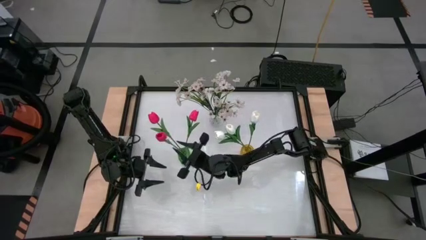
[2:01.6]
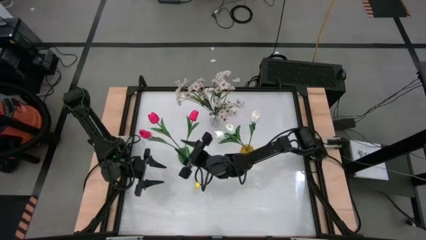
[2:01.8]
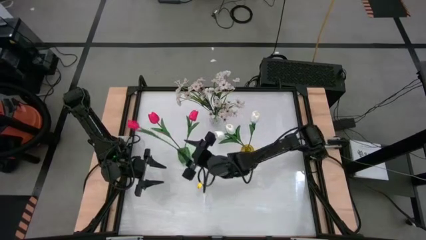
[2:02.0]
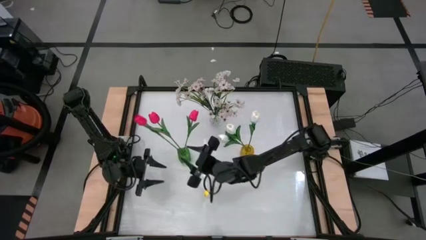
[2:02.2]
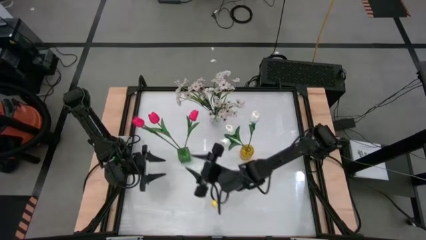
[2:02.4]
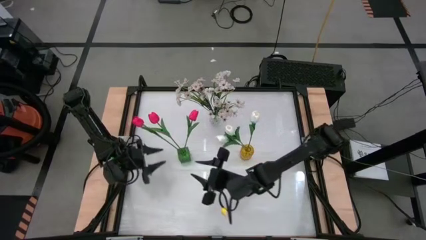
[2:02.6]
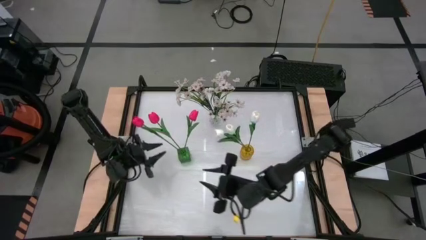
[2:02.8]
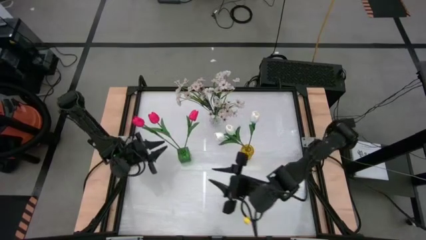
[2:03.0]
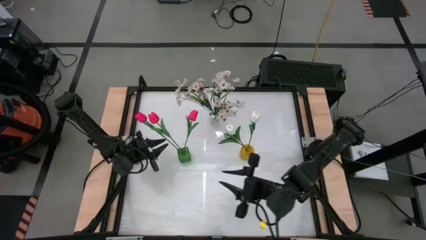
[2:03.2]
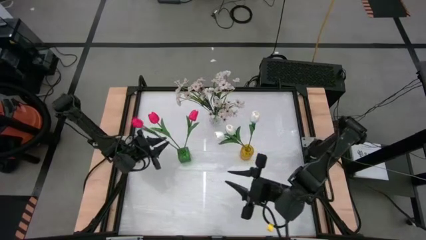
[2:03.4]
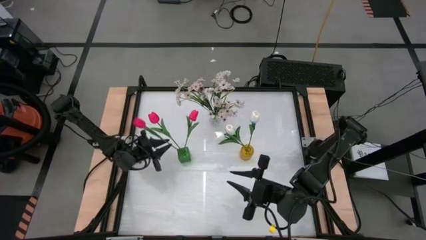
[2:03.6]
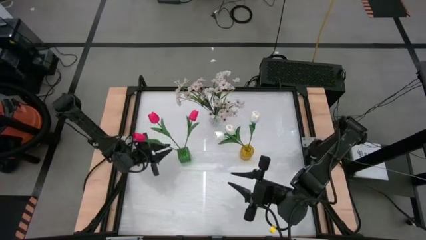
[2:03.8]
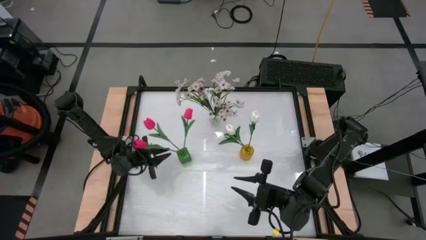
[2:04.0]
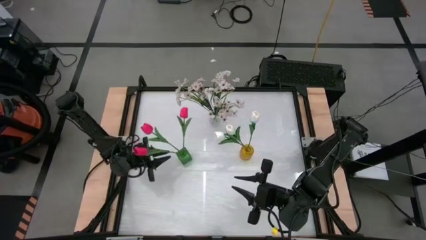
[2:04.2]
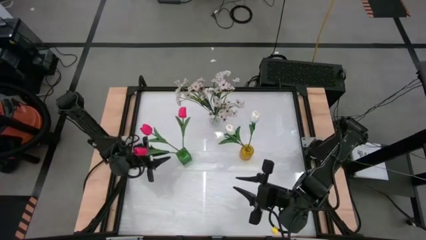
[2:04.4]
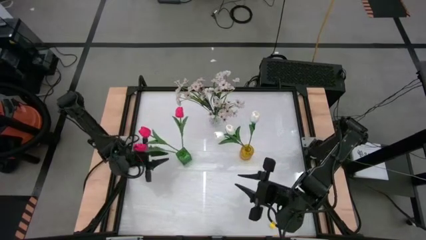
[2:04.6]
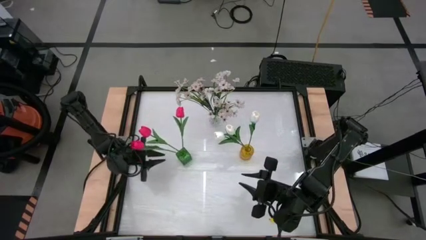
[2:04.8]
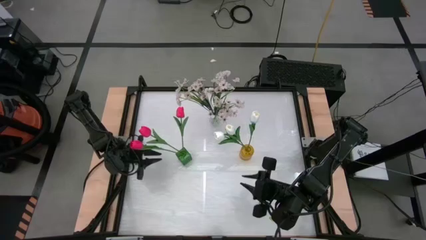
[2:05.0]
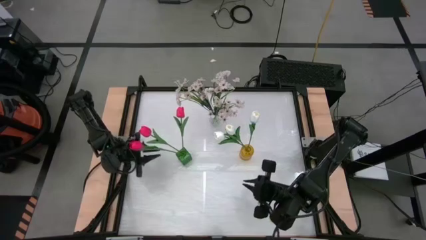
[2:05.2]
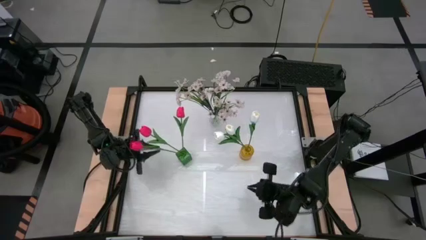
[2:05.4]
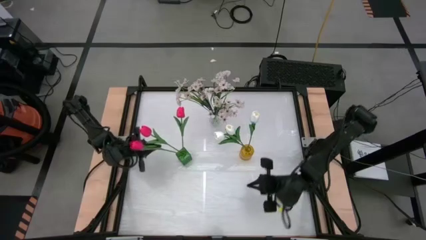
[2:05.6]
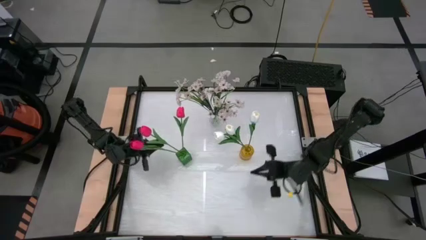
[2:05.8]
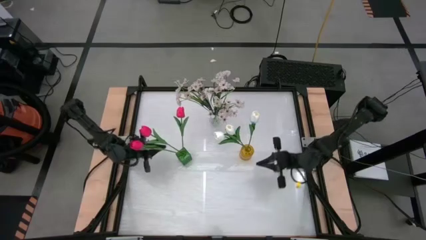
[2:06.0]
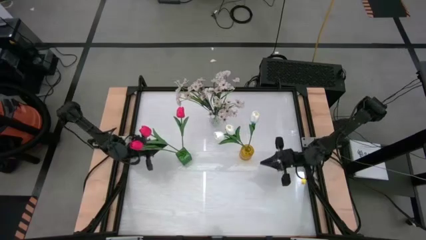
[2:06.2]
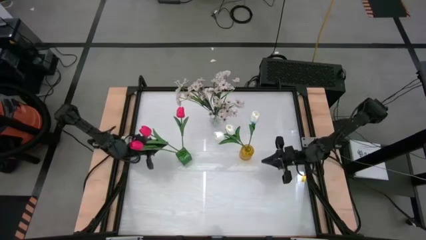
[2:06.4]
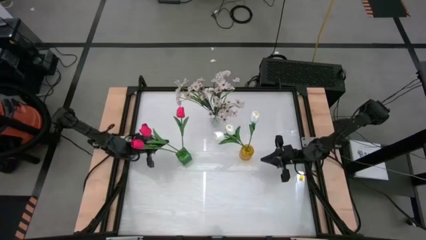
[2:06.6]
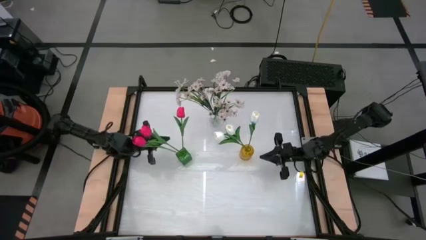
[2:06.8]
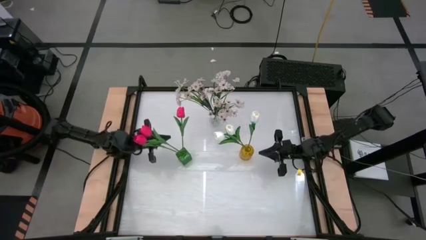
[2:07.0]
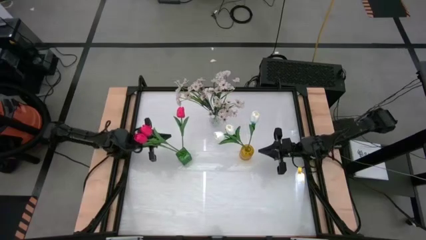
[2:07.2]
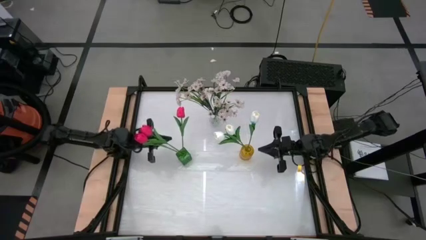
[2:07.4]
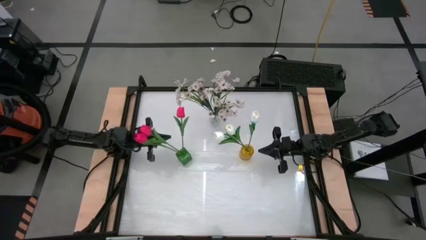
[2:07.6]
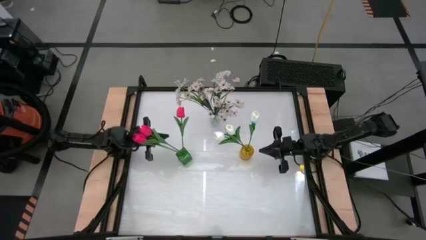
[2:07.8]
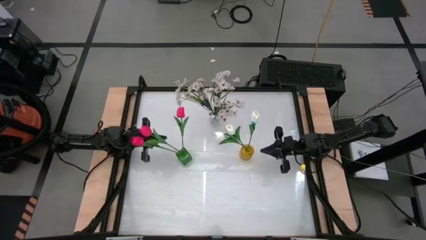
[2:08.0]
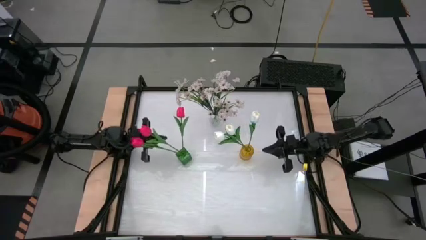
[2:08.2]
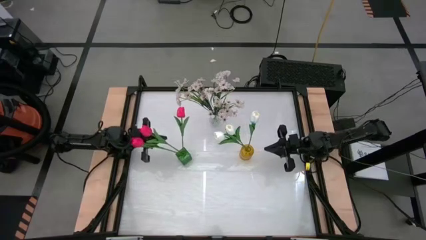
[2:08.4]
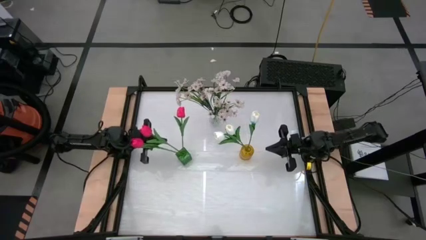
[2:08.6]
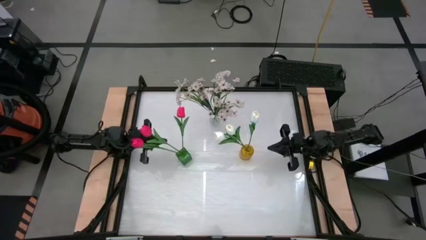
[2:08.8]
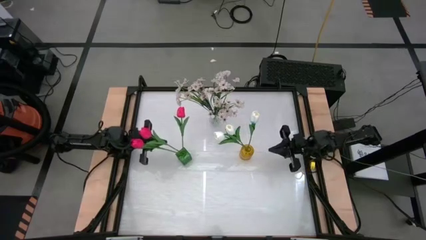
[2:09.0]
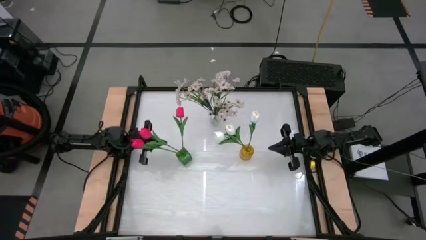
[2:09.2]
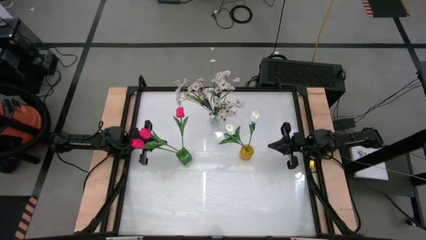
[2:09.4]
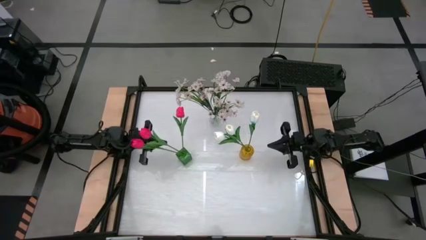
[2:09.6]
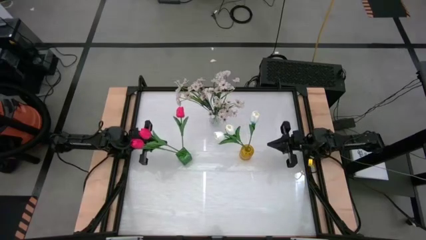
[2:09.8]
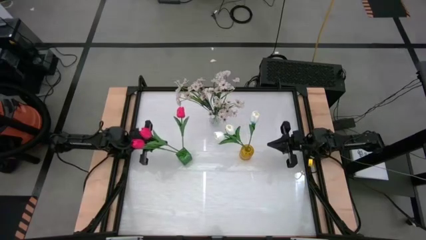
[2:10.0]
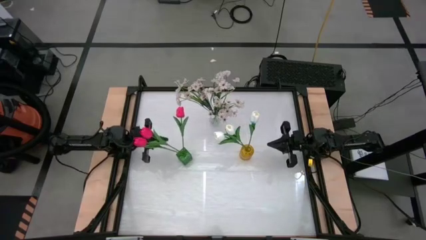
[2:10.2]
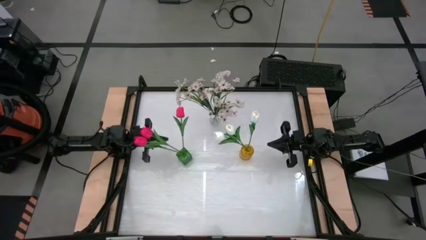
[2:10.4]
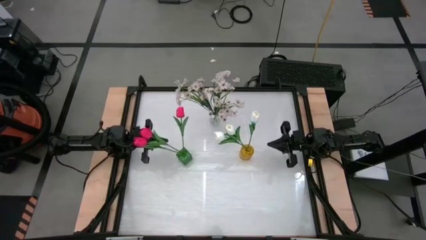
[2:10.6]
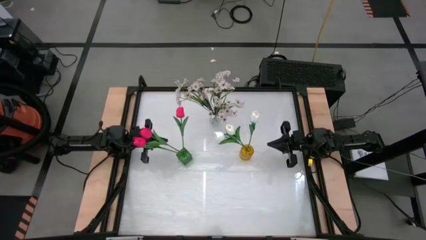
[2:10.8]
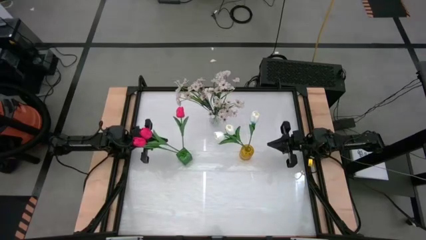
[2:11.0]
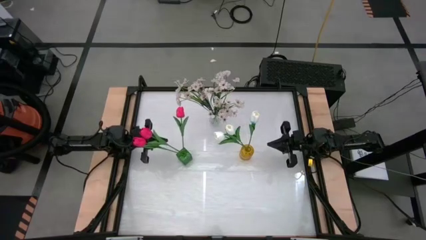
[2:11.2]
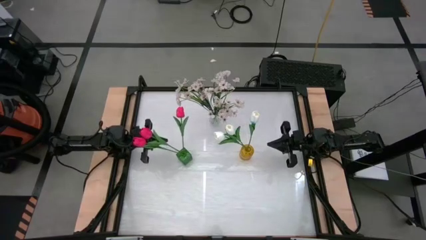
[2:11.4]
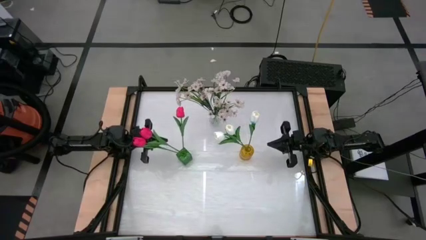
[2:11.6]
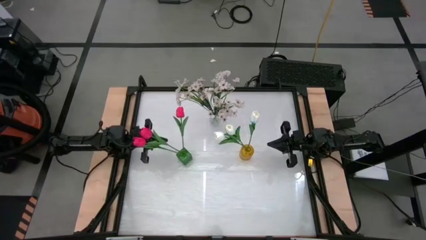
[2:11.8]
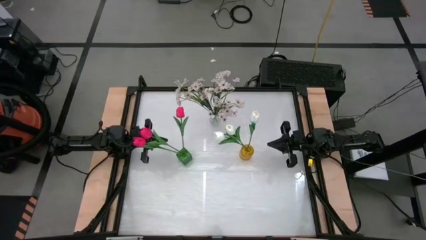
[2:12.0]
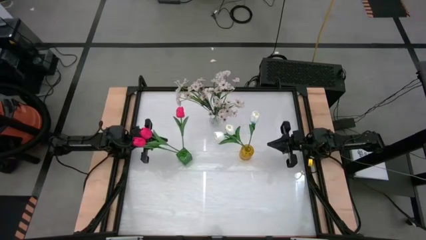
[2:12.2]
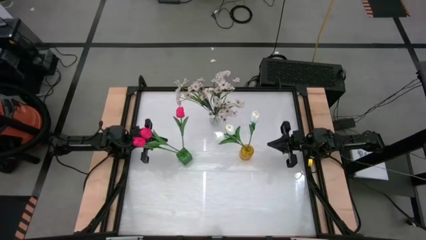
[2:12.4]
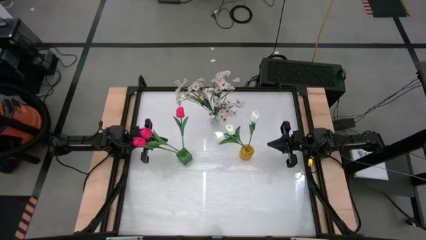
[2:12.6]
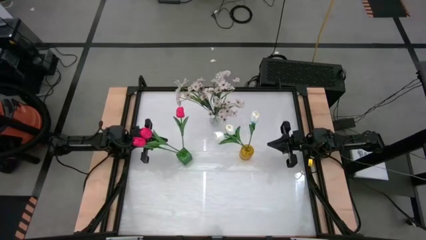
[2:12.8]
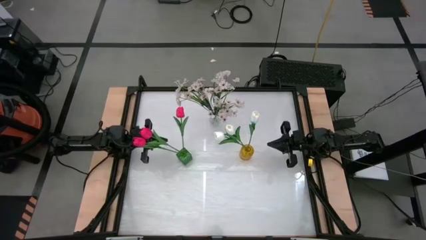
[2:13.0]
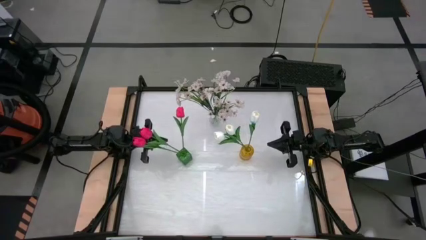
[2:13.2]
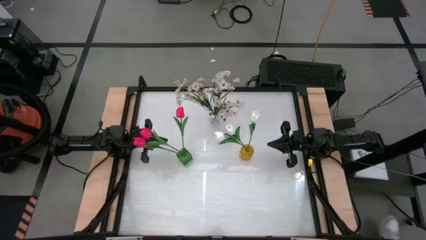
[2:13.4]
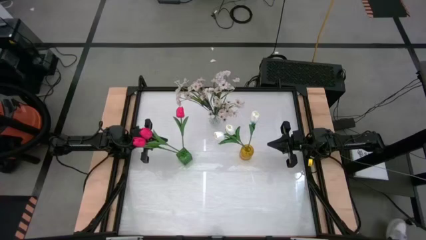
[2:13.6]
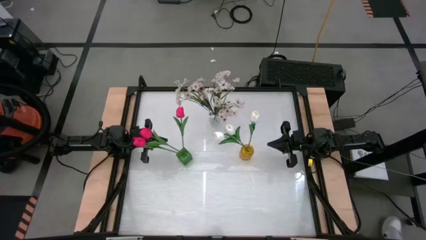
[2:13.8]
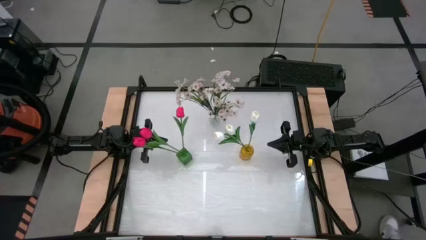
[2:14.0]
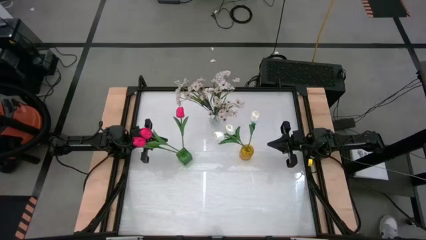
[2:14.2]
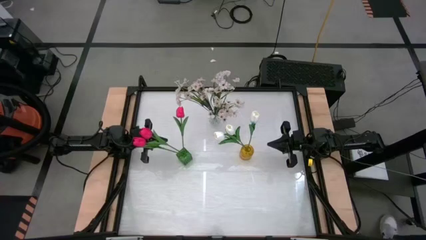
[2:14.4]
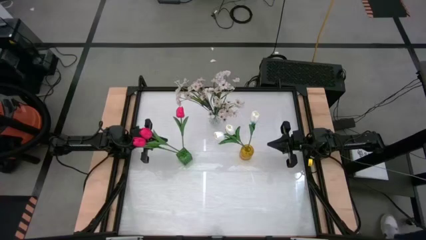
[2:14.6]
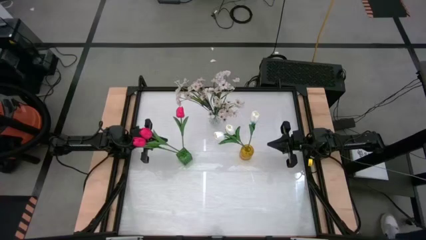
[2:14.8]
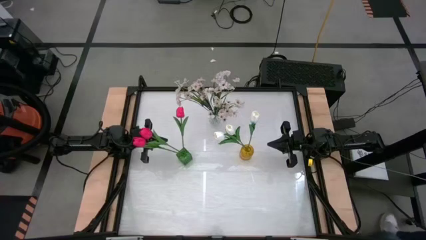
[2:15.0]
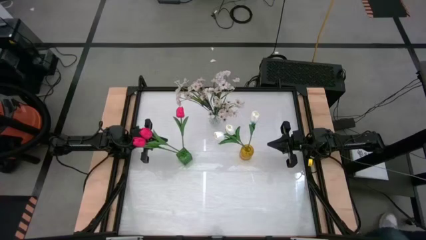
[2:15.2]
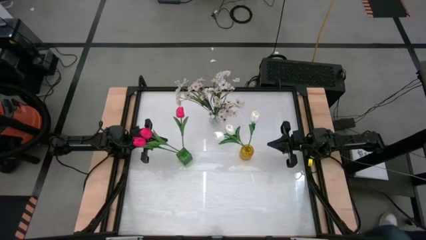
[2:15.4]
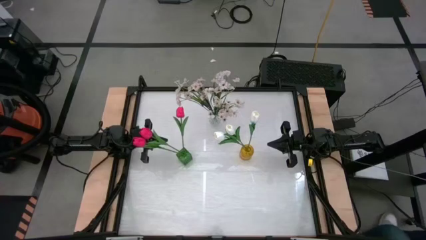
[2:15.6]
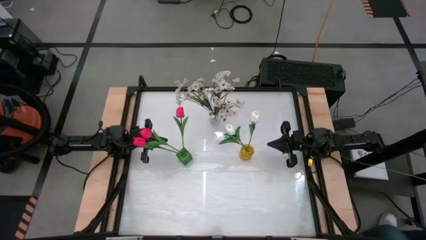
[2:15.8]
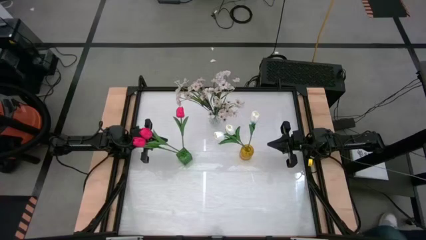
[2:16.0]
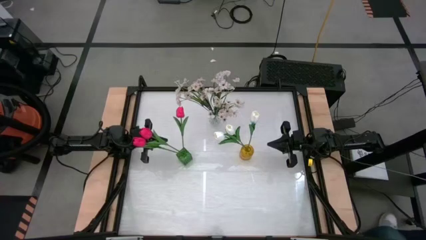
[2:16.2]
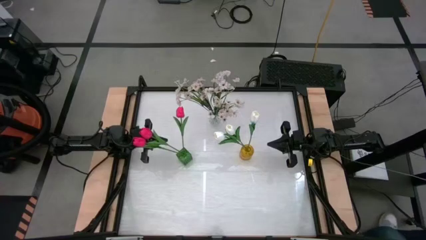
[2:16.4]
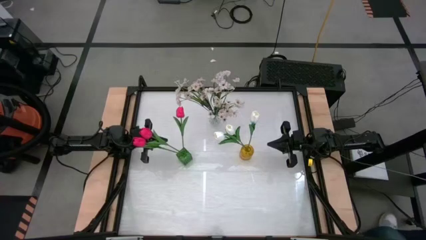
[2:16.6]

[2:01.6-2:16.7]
Task: Sort flowers into vase by color
Return to Home Position
